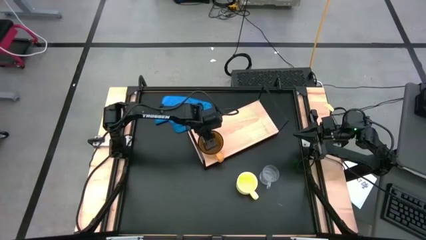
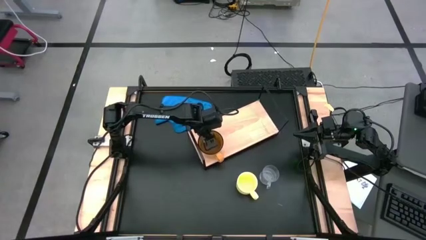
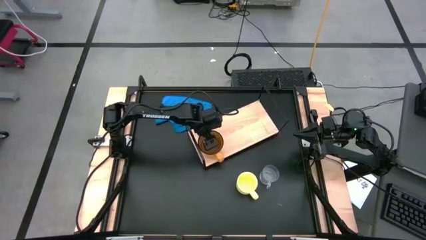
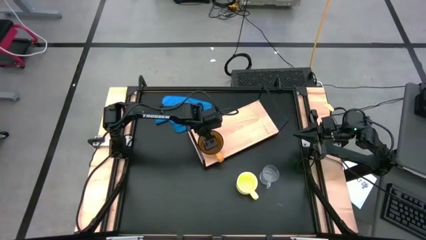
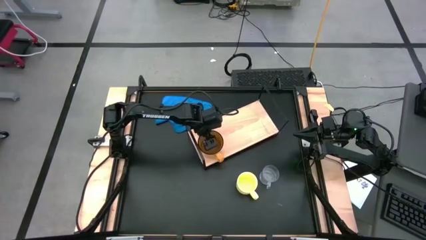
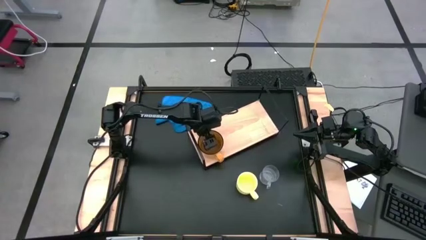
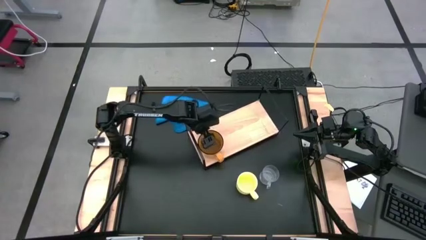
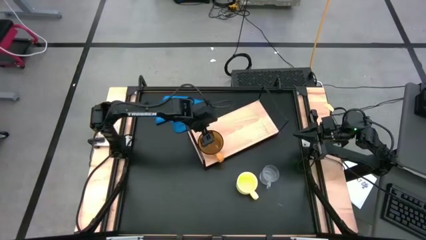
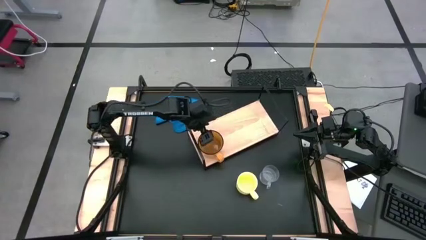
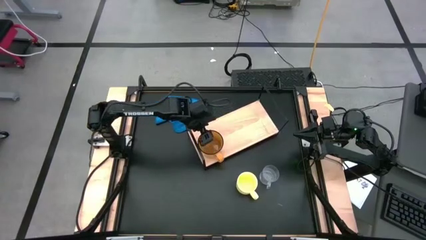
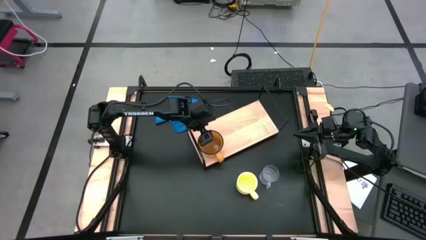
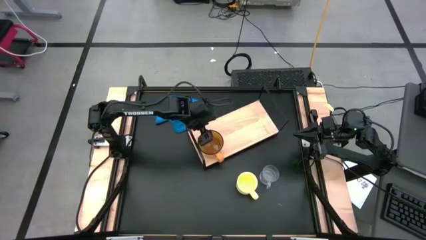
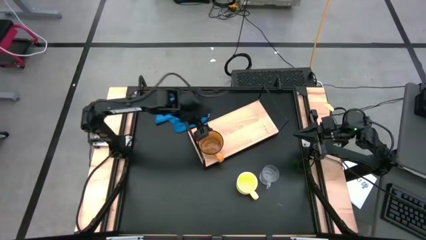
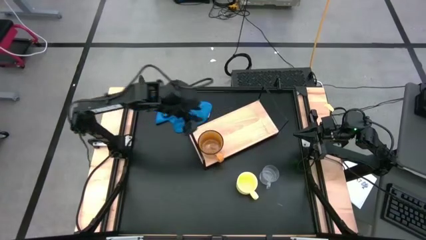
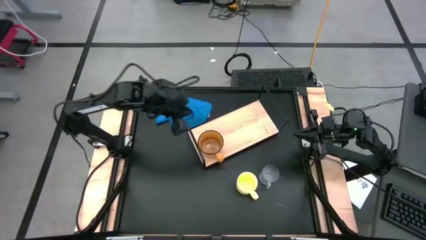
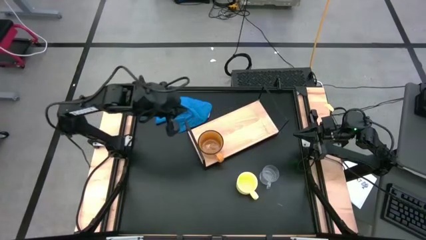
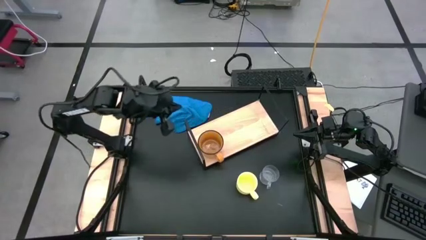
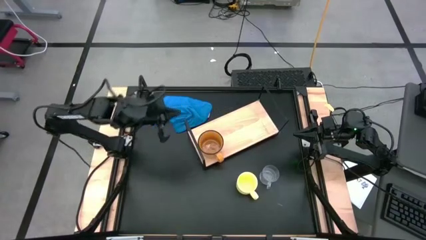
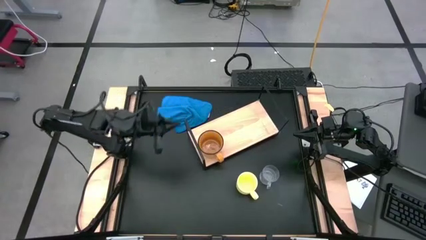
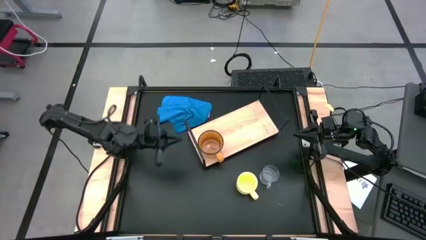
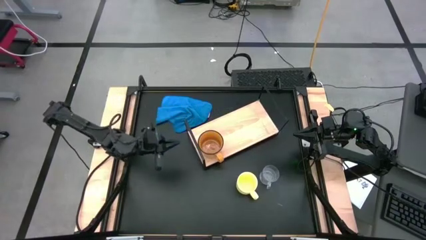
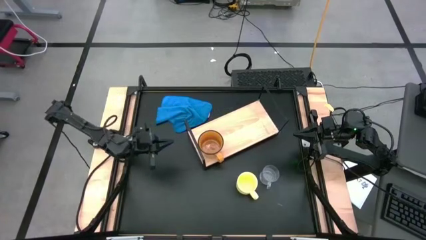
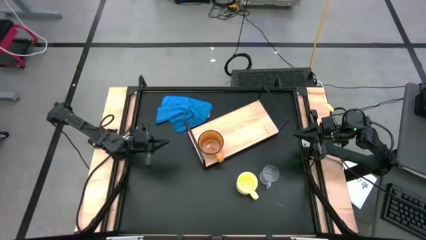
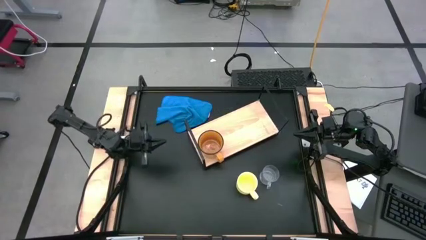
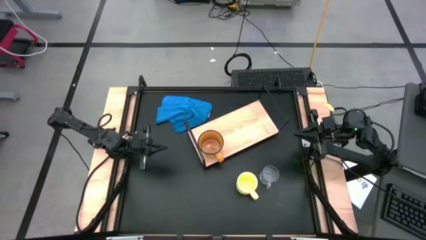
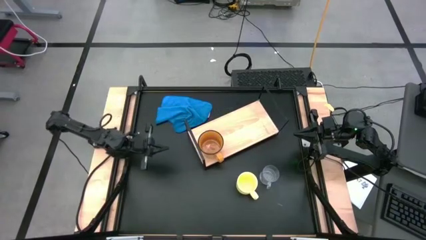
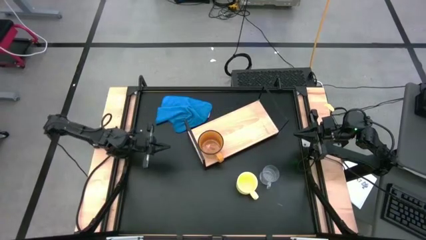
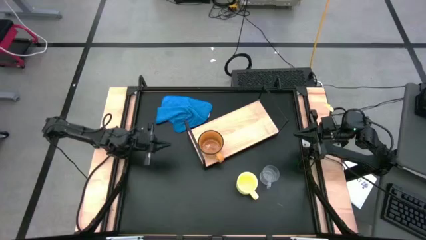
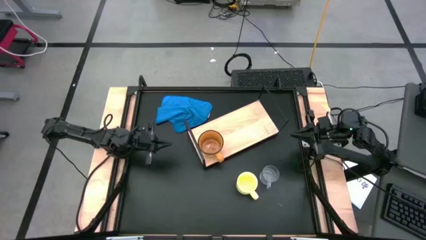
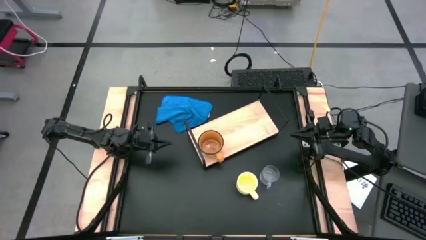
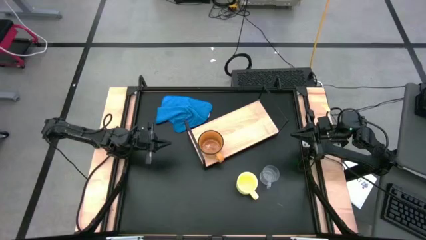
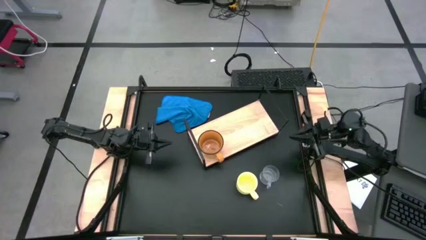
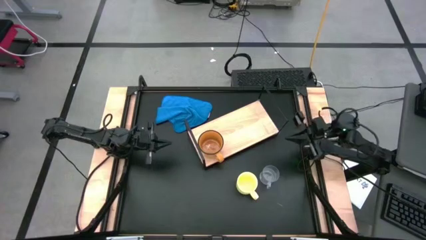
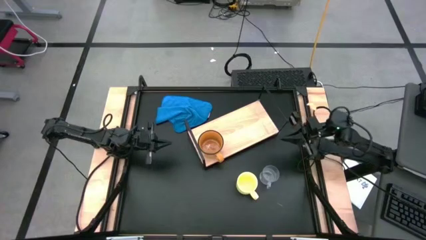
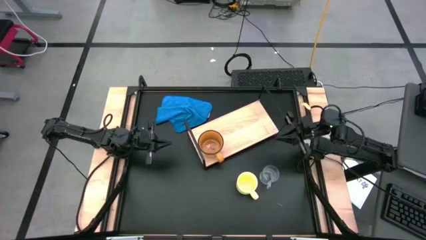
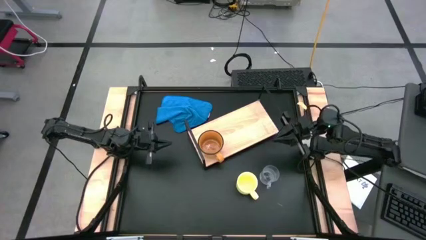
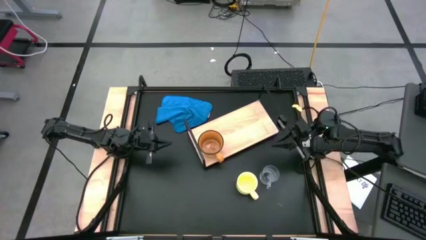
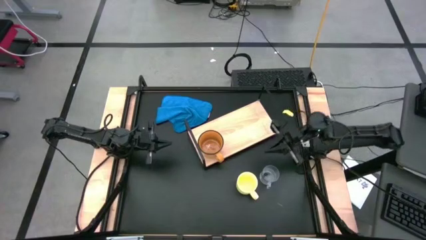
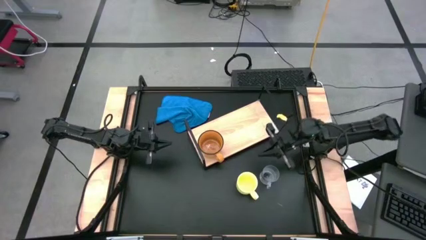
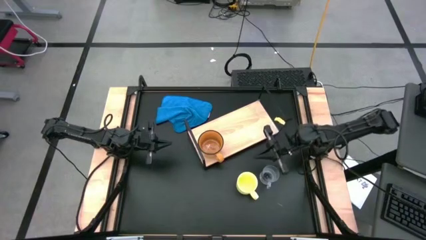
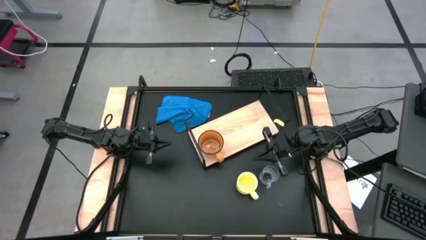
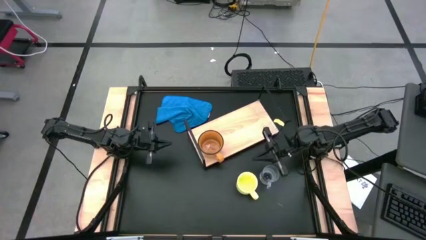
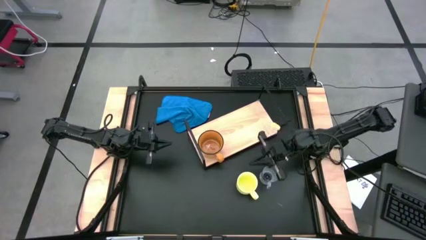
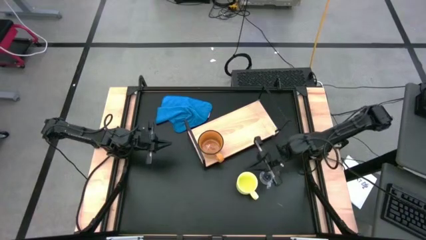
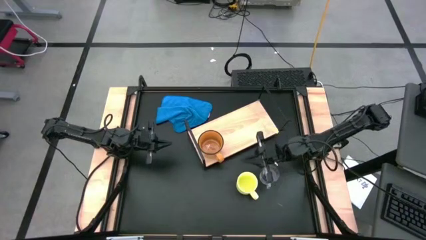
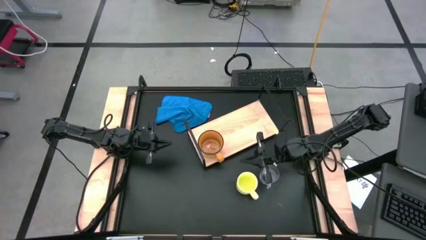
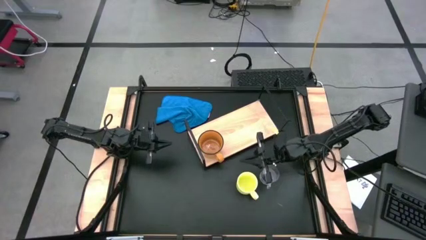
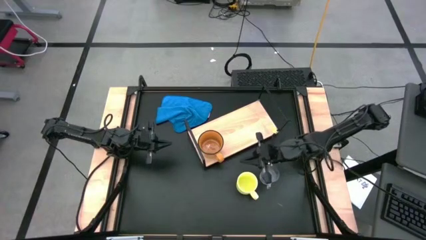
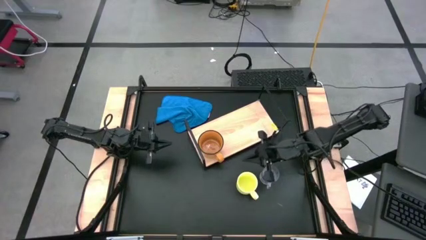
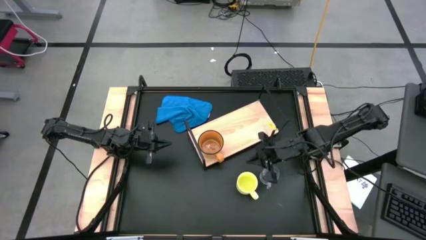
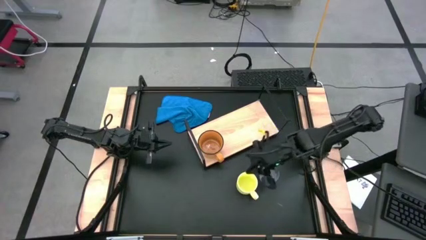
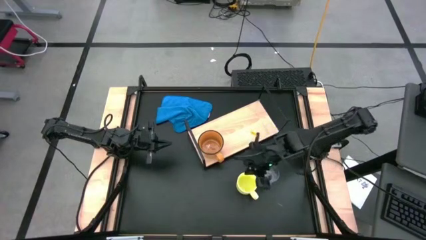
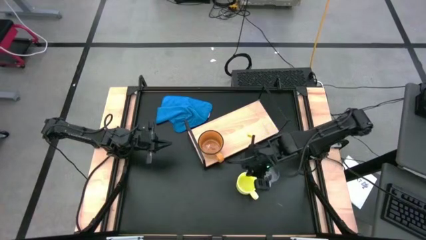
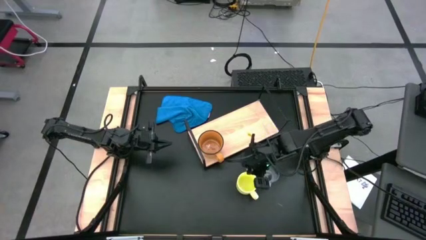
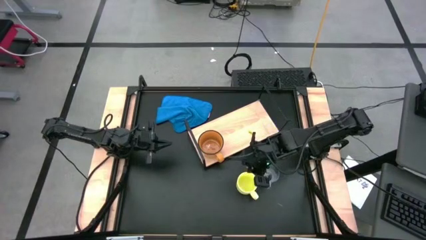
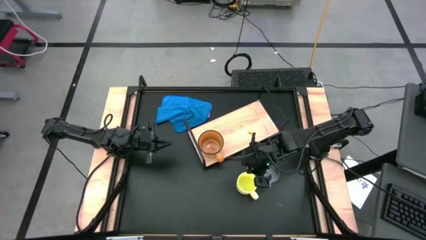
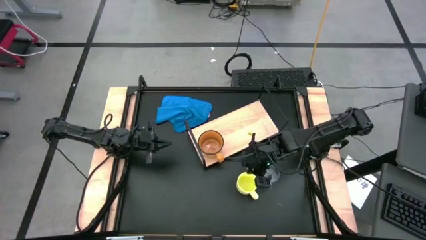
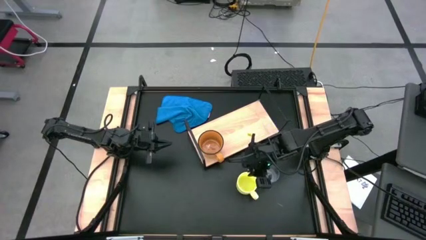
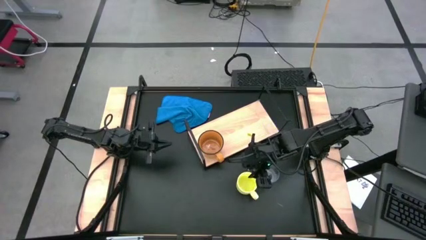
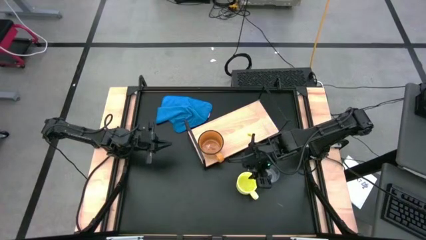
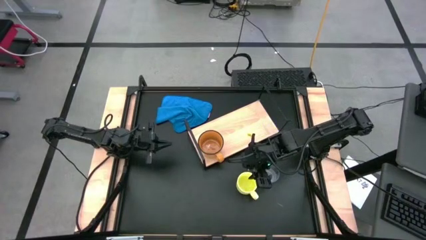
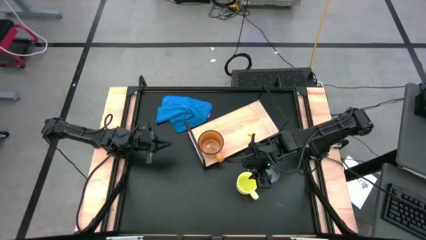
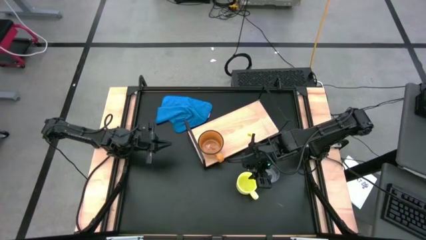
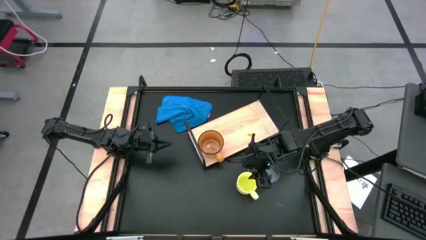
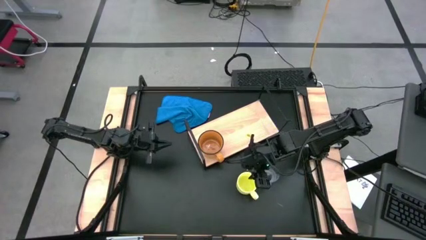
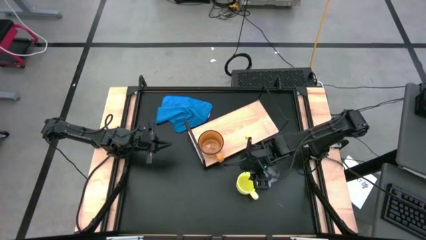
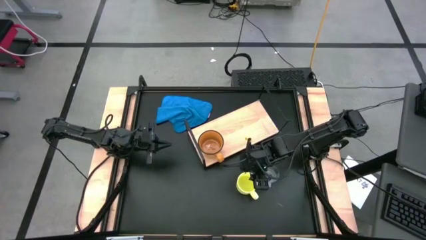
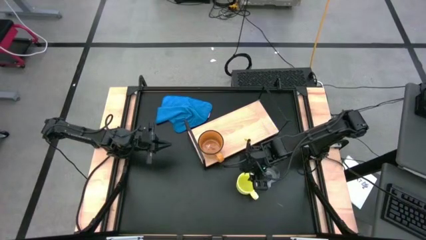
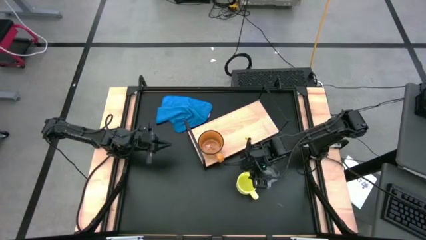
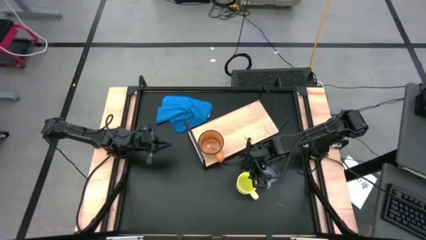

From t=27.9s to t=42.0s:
Task: Stack small to large cups/mugs on shelf
Put the yellow mug on the shelf
